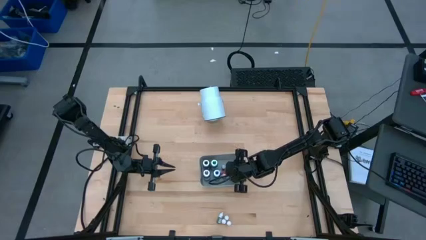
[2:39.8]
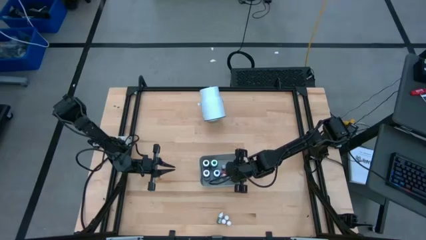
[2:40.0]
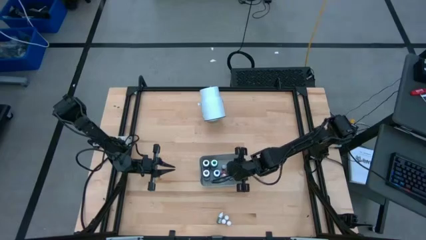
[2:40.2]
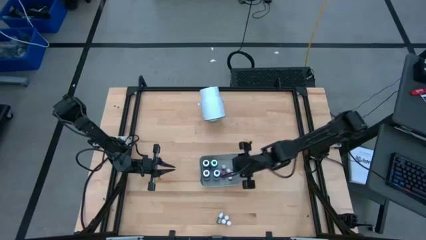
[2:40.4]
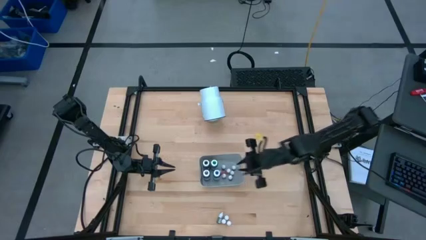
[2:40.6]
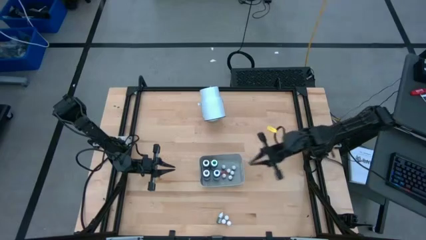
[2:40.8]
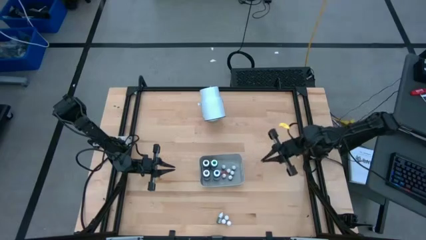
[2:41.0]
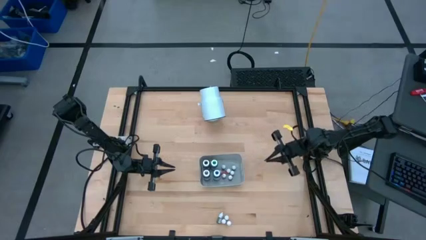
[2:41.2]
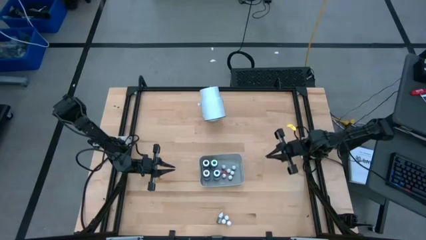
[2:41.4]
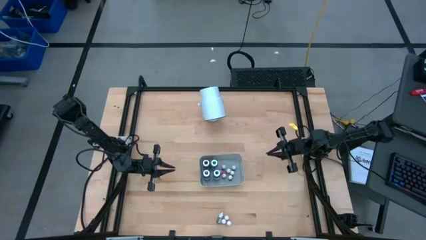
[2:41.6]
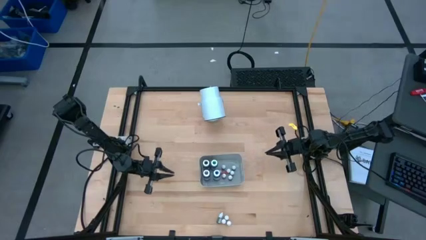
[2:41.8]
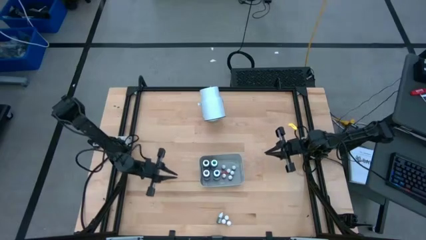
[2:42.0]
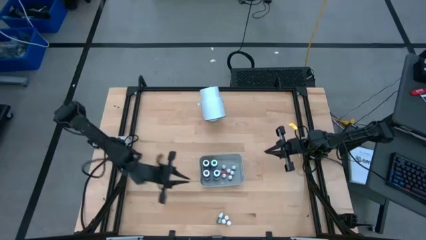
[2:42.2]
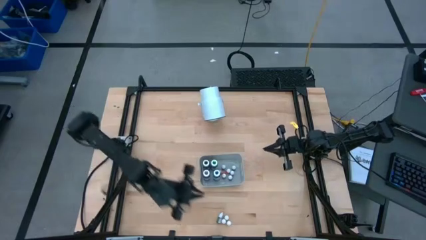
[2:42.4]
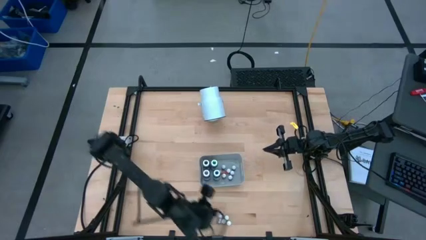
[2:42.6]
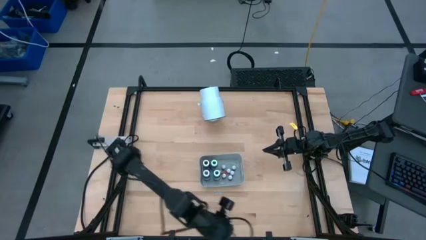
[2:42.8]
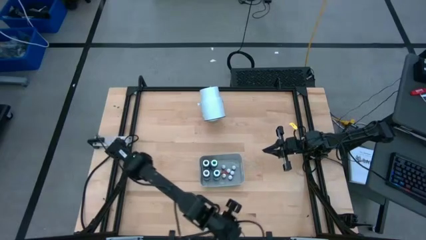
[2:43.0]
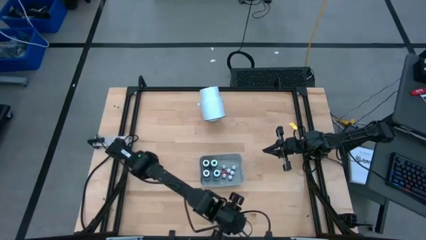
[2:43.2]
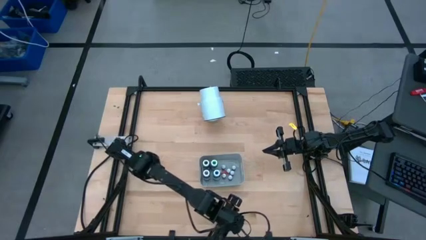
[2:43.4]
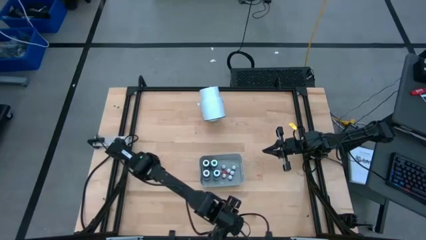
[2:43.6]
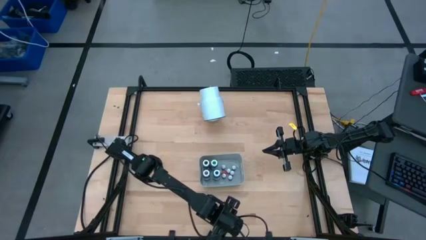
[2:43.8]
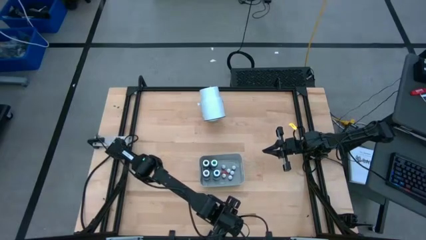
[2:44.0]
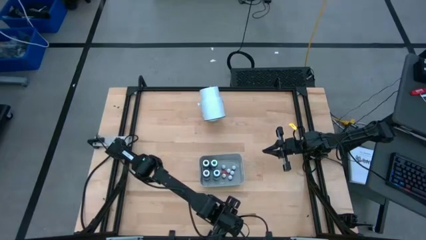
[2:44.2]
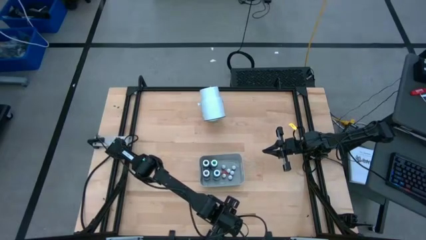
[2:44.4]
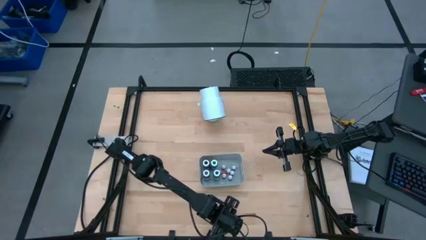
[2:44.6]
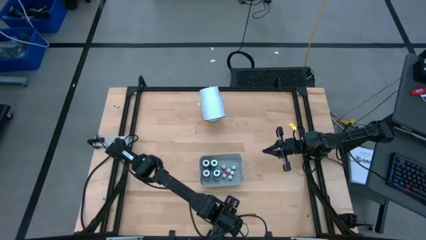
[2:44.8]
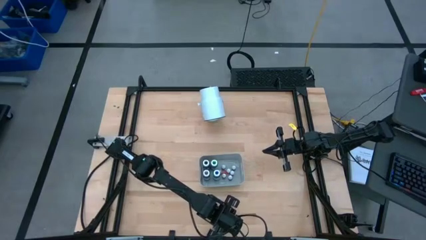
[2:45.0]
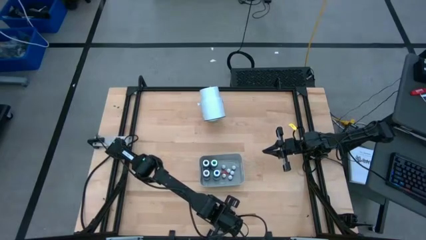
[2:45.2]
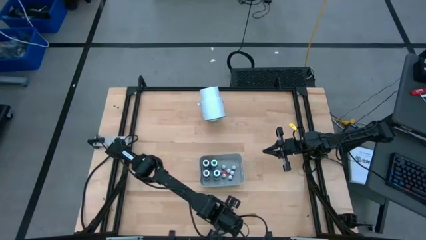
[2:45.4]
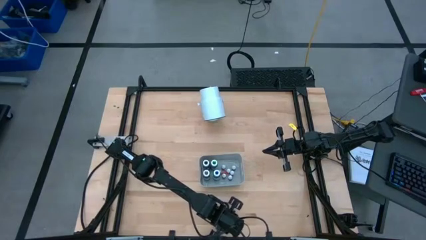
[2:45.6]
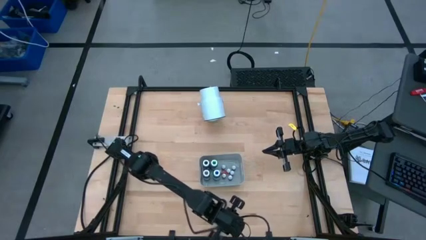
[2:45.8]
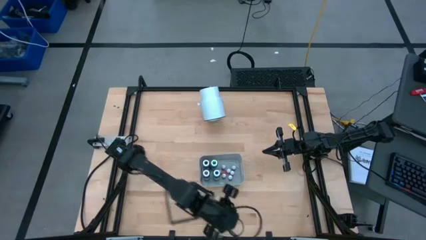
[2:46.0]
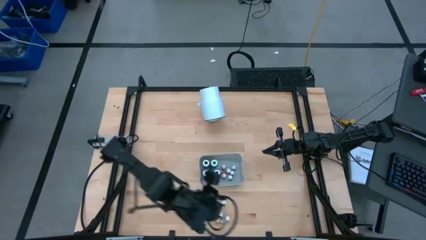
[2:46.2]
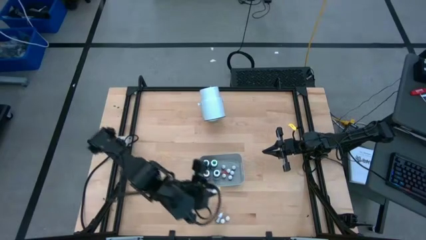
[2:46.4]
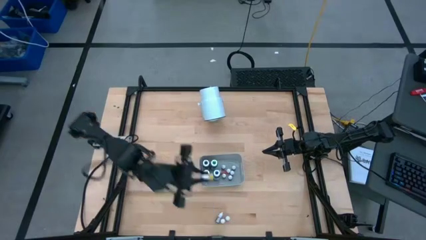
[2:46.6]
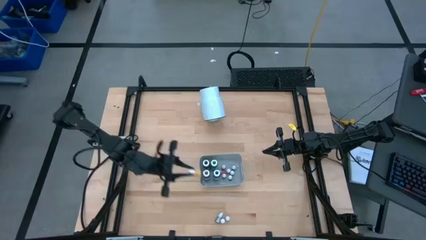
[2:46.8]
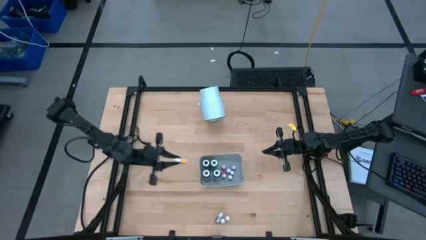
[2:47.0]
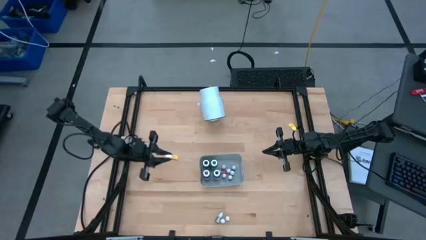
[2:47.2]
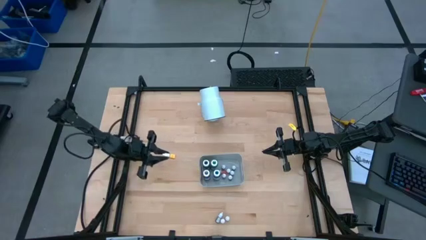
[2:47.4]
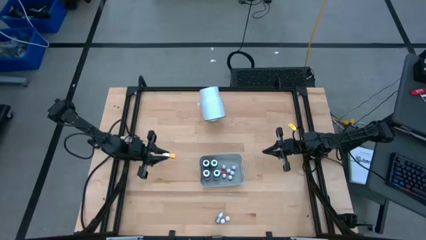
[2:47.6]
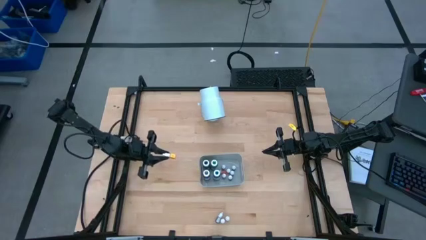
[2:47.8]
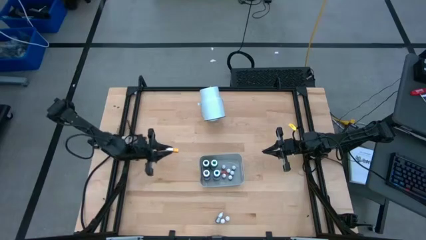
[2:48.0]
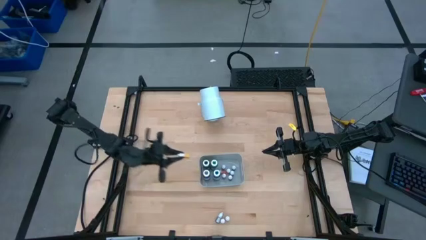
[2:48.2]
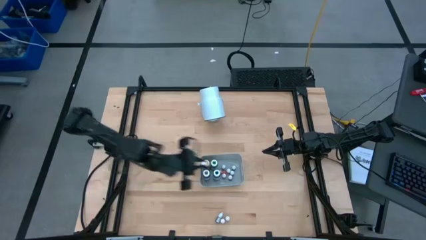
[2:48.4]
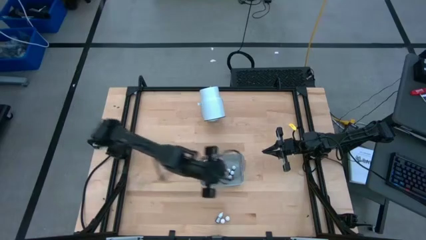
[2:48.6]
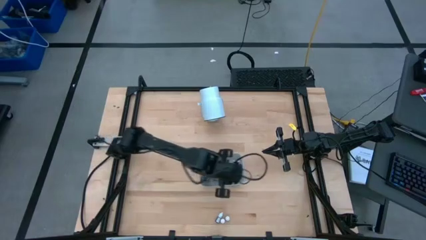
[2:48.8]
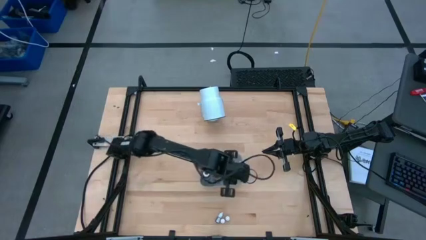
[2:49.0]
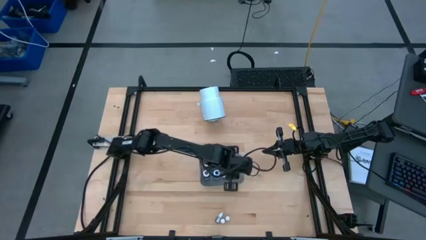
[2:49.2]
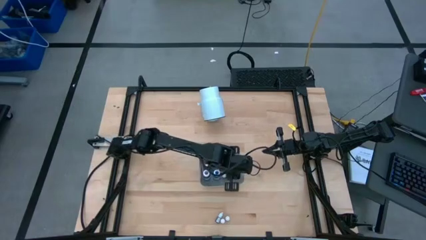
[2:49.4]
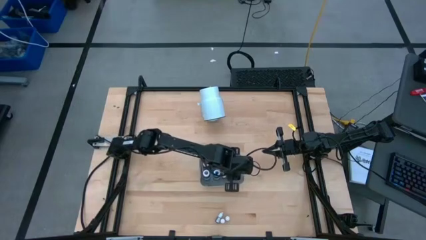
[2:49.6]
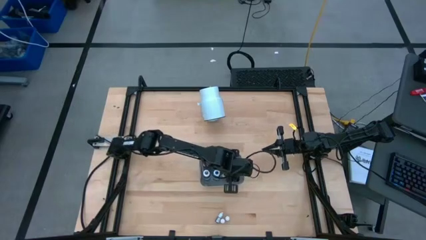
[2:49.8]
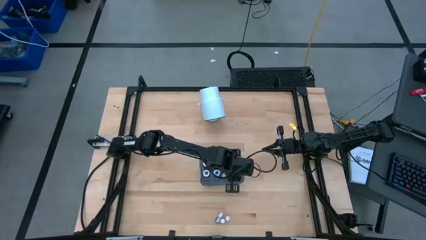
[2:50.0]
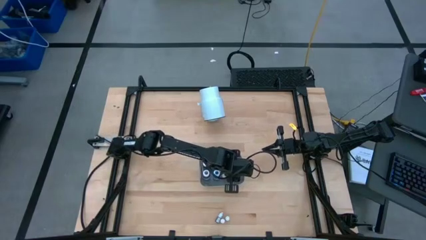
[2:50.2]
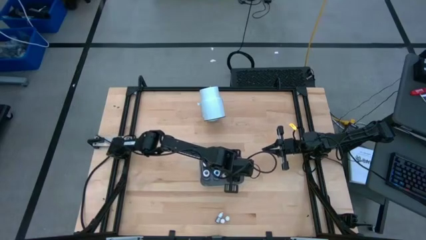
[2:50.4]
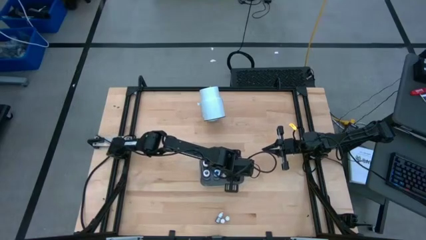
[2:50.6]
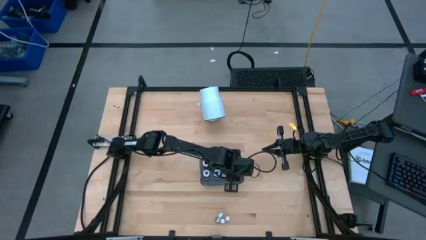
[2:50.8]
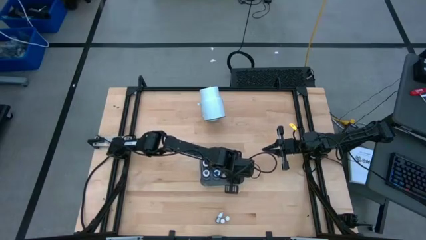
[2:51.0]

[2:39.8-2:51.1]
Task: Pick & Place food coloring
Put the small yellow food coloring into the gray bin

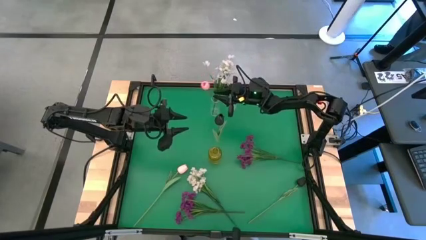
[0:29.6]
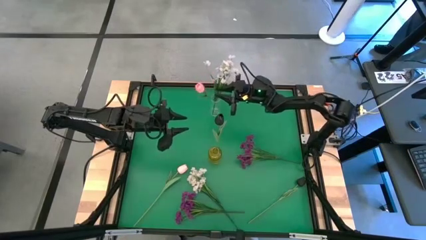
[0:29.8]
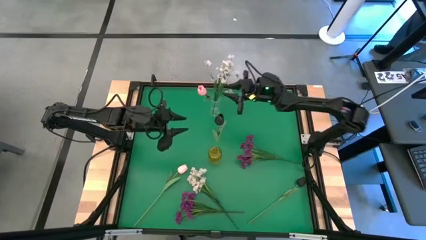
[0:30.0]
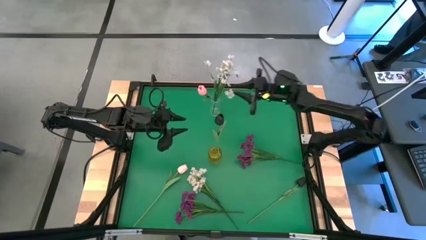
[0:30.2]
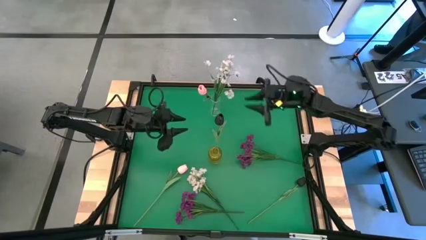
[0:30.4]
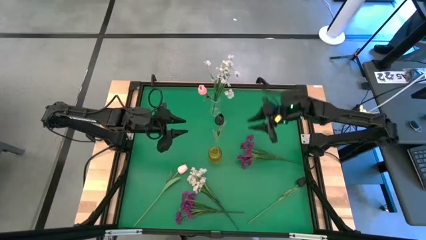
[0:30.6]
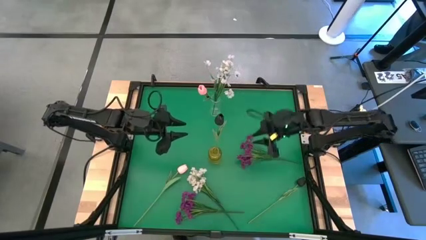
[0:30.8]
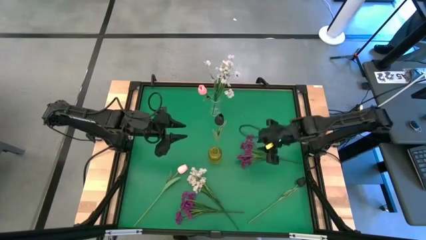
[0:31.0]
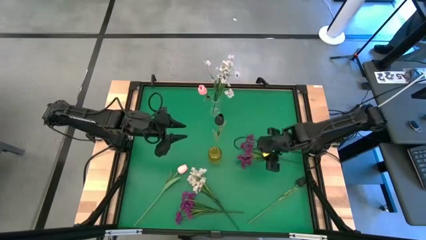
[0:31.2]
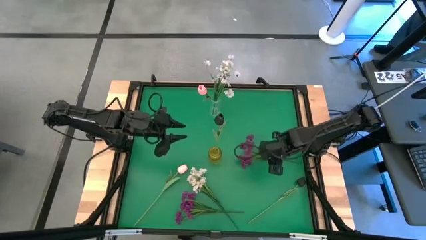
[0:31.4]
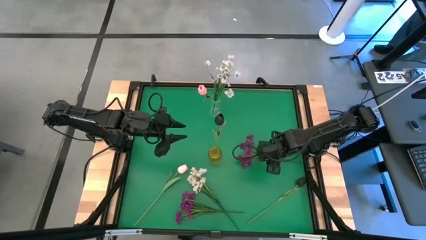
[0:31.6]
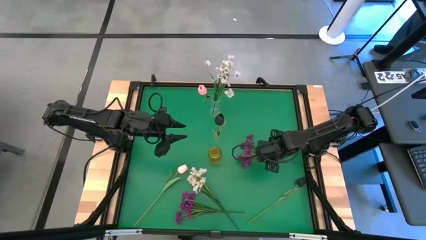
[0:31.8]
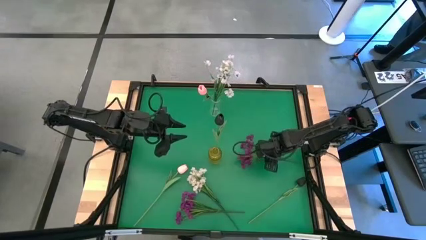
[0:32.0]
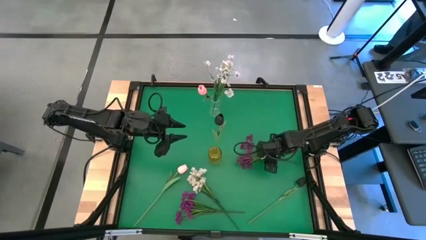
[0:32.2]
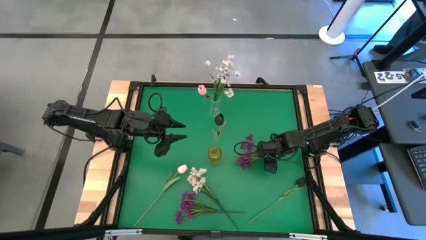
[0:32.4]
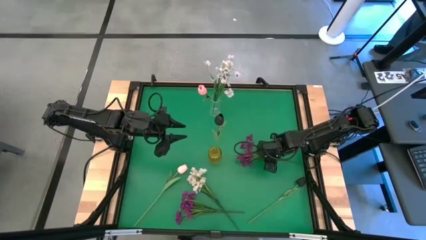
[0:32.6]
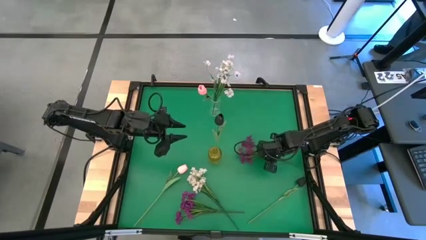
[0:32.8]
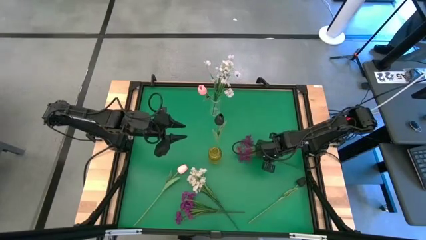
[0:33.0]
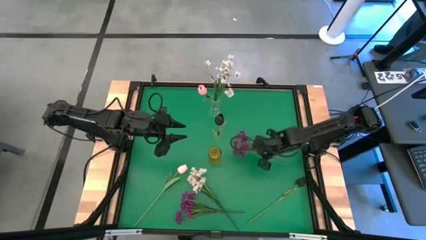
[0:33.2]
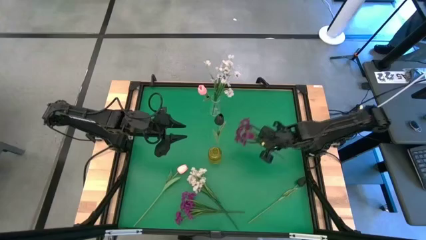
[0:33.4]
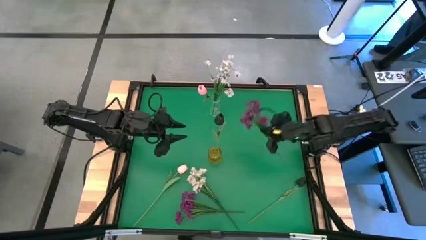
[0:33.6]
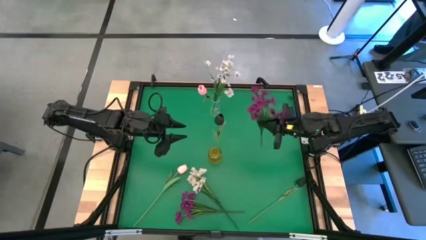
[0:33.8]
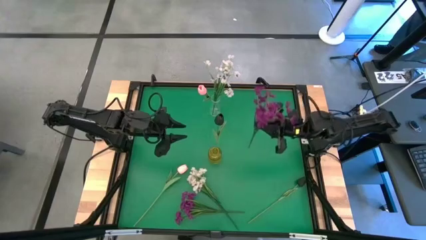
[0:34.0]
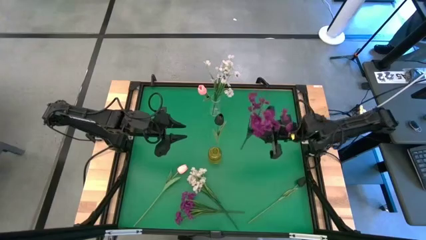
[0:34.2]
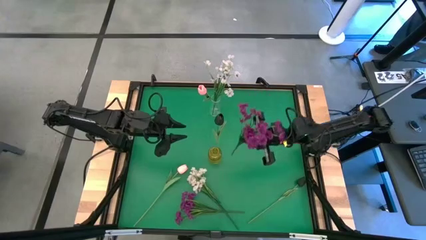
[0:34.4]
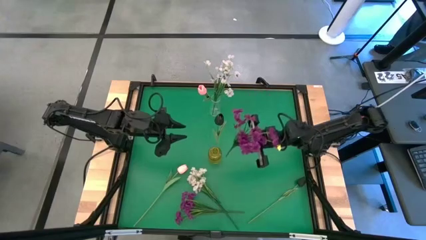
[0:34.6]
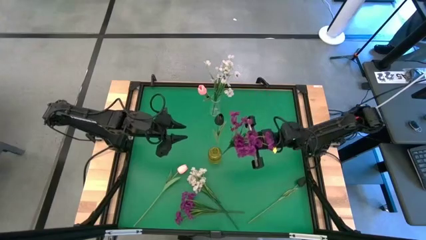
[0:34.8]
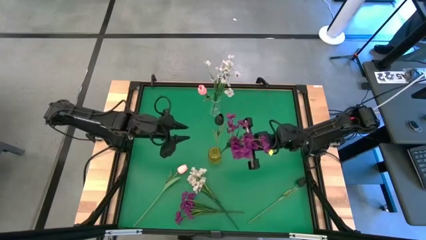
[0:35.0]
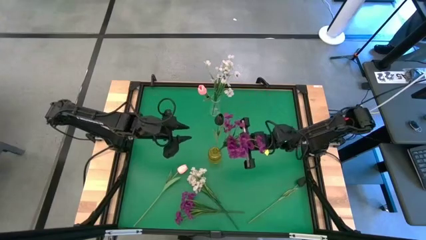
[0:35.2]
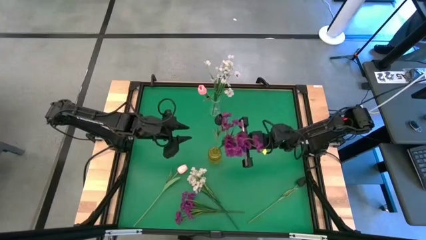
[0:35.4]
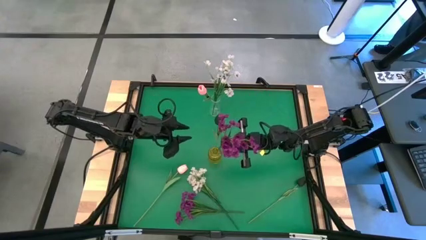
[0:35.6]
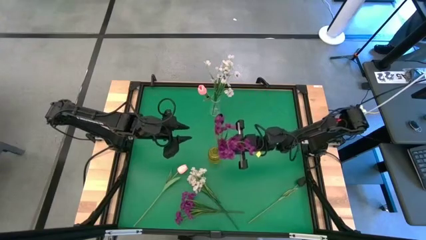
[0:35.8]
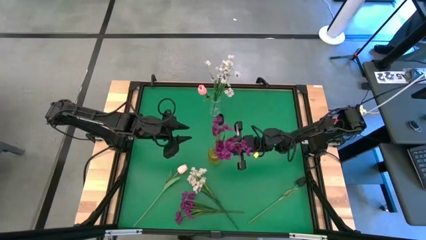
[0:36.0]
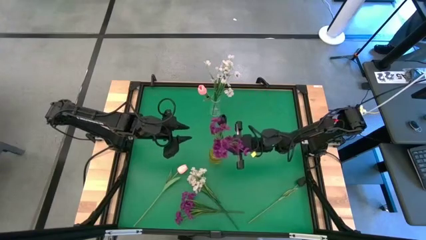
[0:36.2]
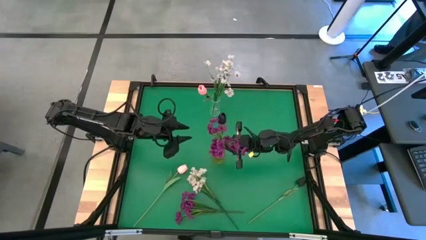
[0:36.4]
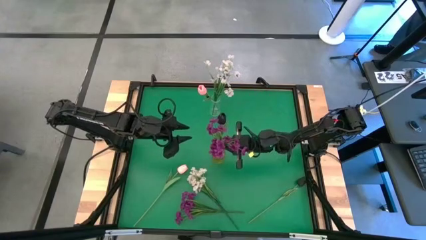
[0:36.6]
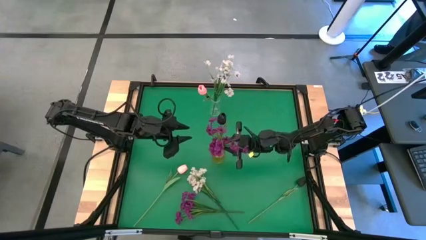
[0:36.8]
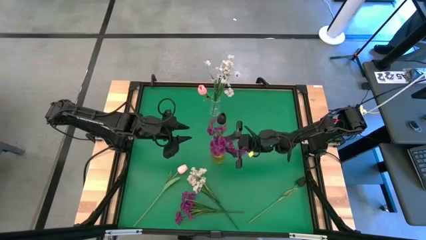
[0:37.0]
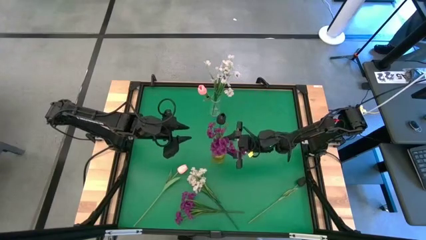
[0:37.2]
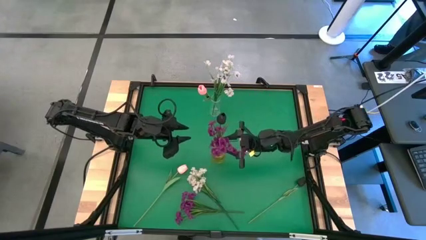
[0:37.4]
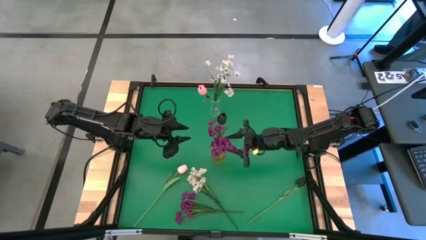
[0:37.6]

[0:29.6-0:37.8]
Task: Sort flowers into vase by color
Put the right violet flower into the yellow transparent vase
